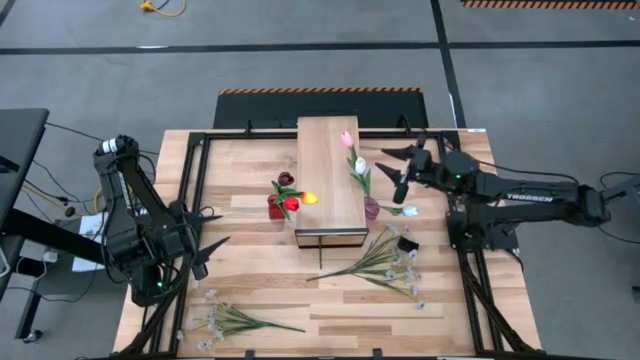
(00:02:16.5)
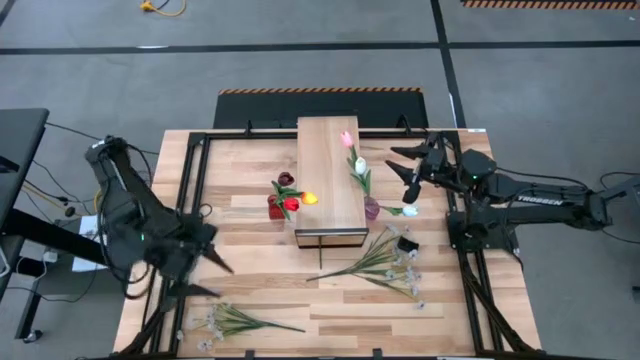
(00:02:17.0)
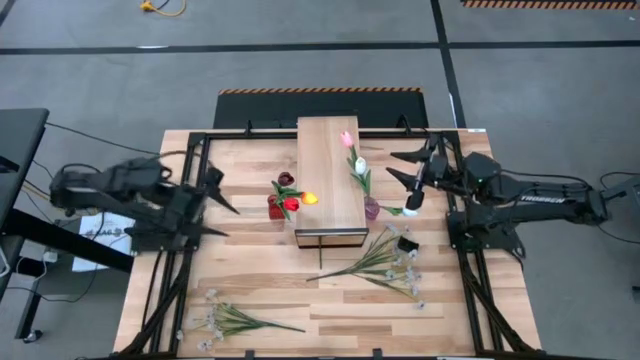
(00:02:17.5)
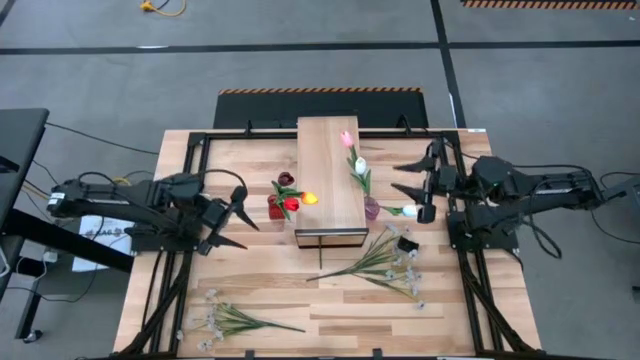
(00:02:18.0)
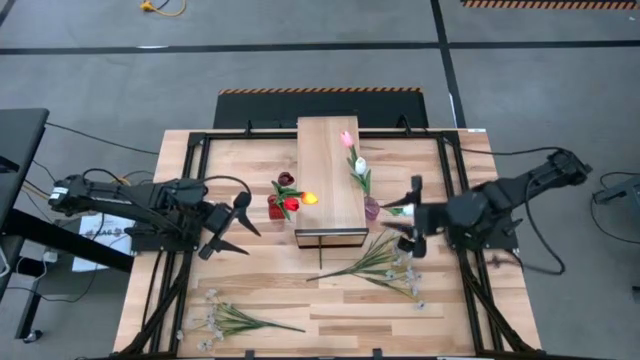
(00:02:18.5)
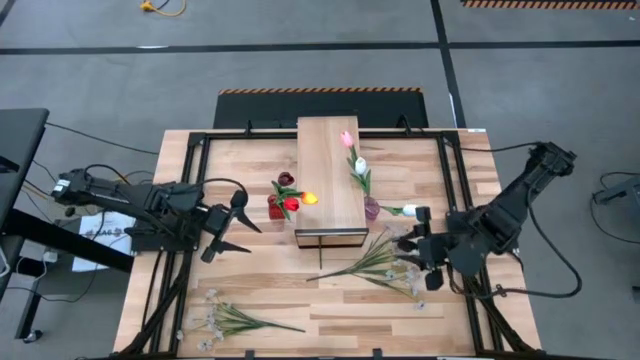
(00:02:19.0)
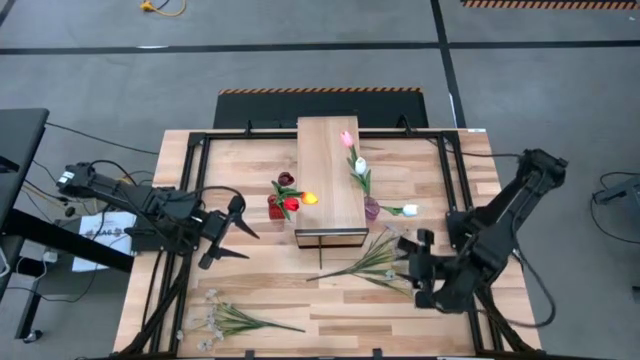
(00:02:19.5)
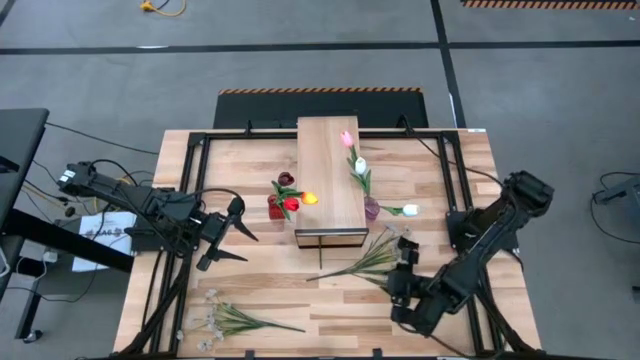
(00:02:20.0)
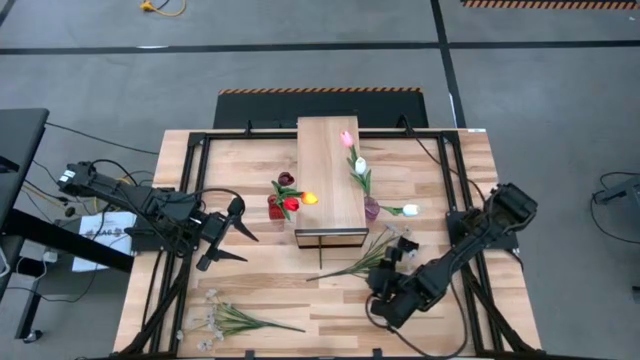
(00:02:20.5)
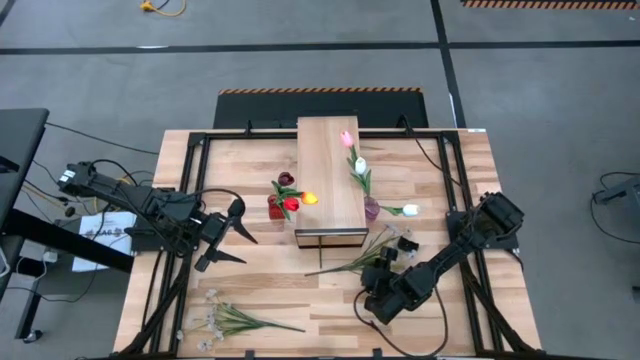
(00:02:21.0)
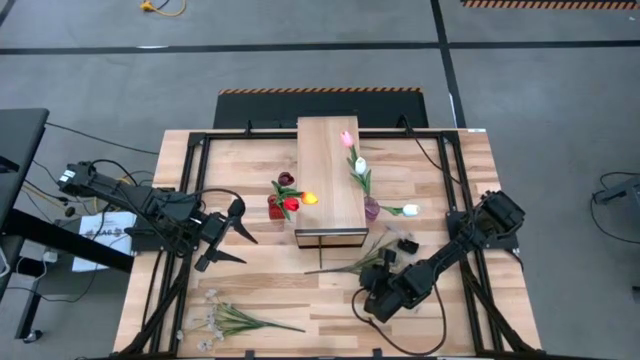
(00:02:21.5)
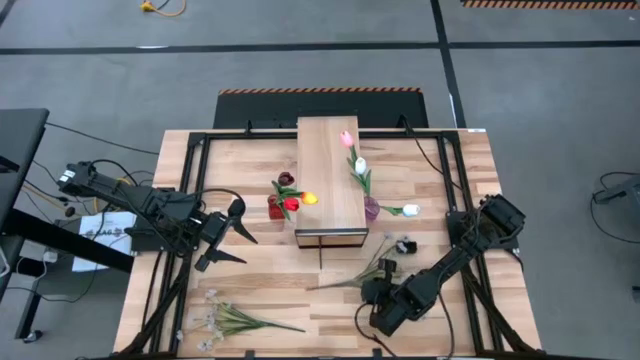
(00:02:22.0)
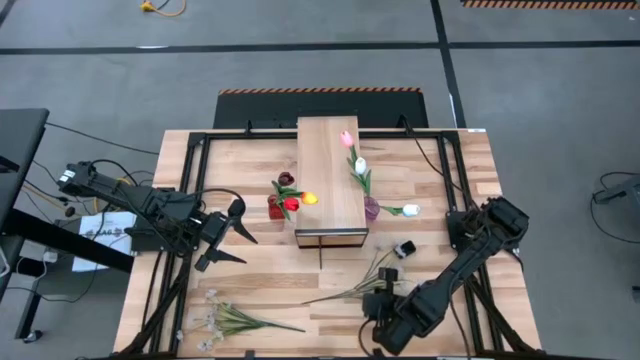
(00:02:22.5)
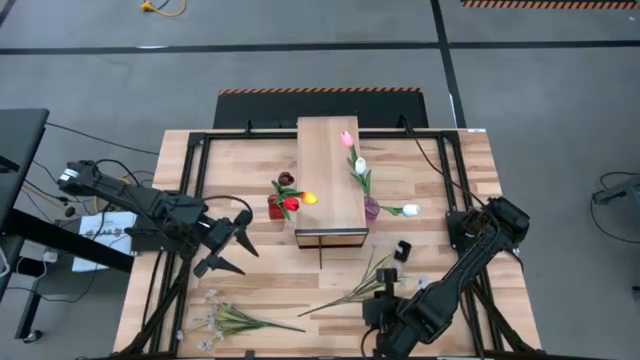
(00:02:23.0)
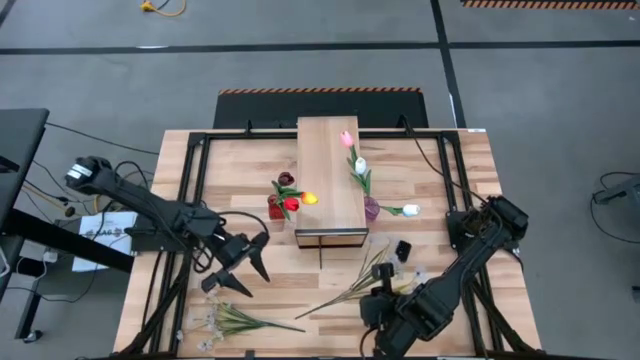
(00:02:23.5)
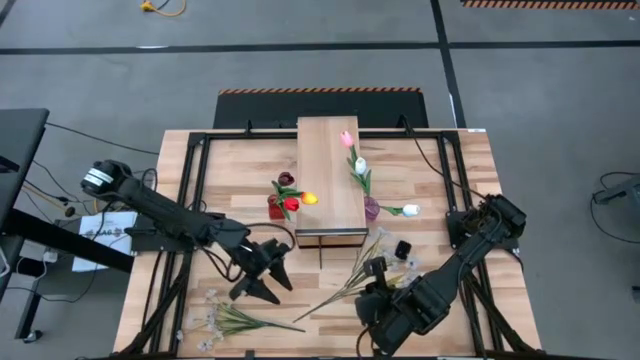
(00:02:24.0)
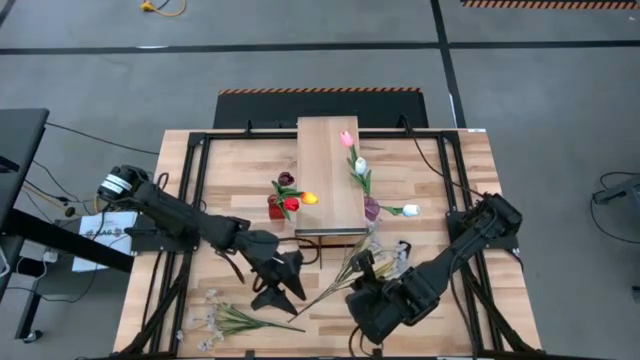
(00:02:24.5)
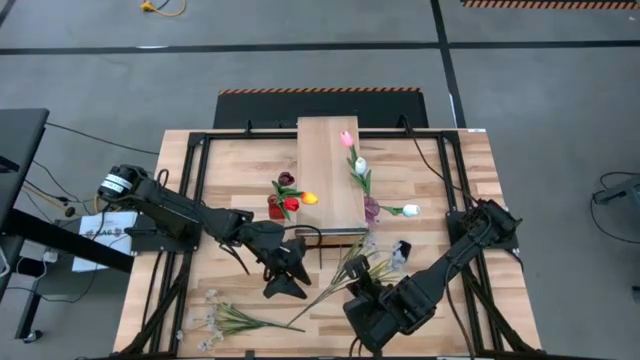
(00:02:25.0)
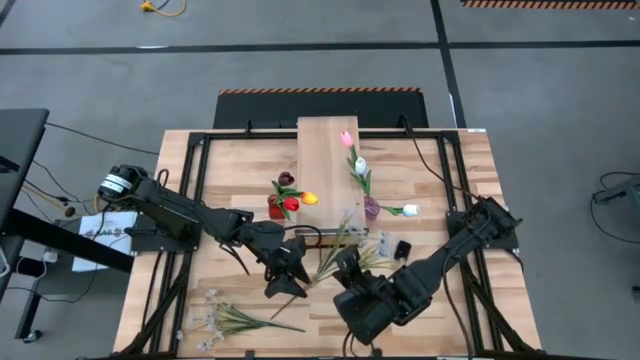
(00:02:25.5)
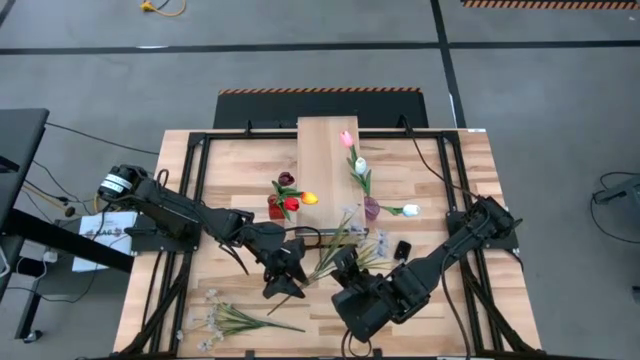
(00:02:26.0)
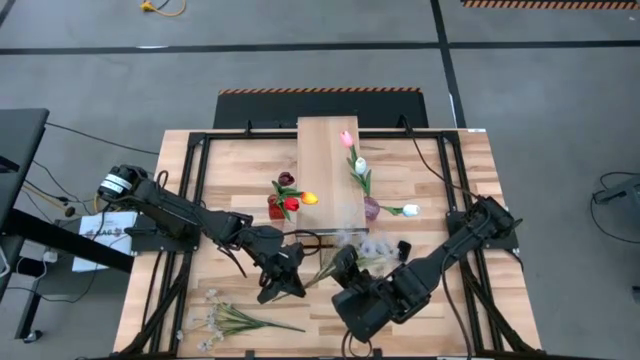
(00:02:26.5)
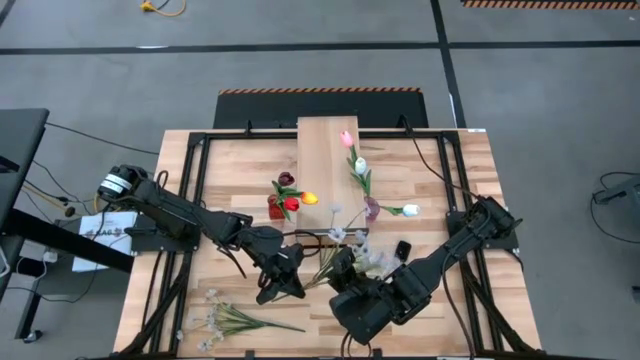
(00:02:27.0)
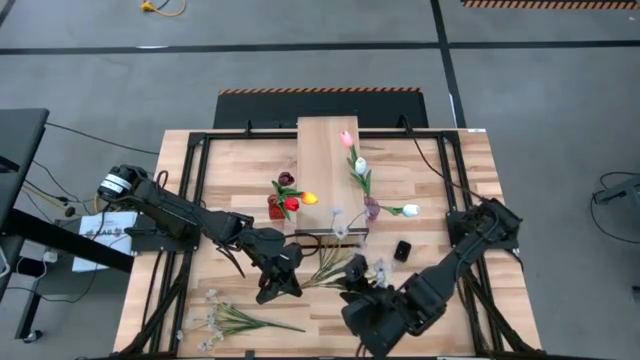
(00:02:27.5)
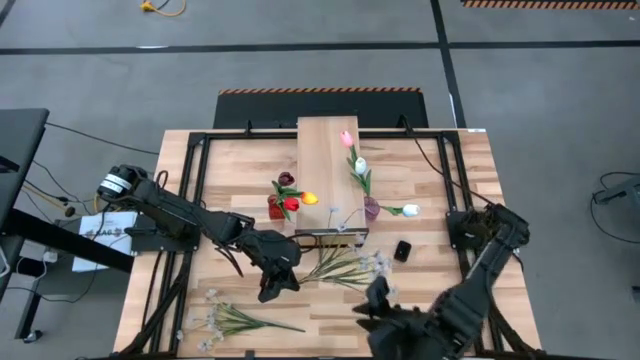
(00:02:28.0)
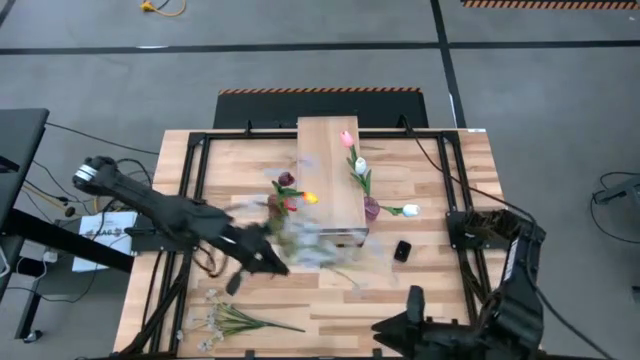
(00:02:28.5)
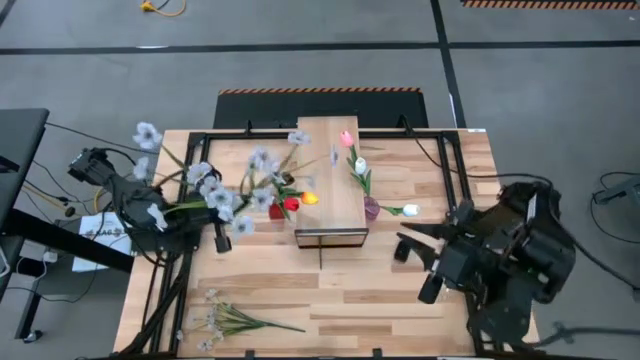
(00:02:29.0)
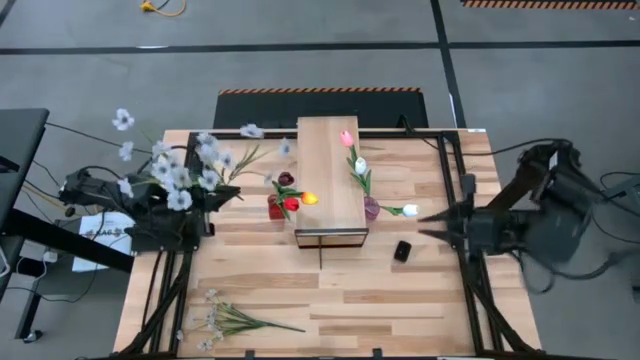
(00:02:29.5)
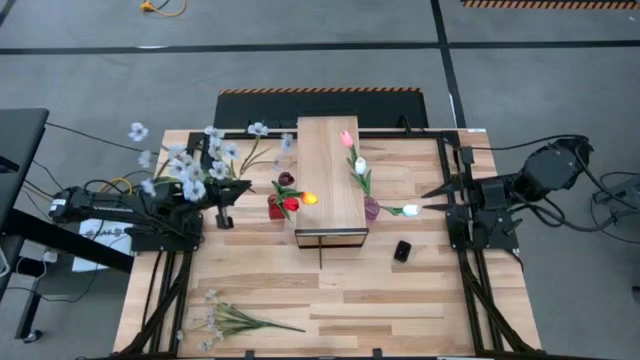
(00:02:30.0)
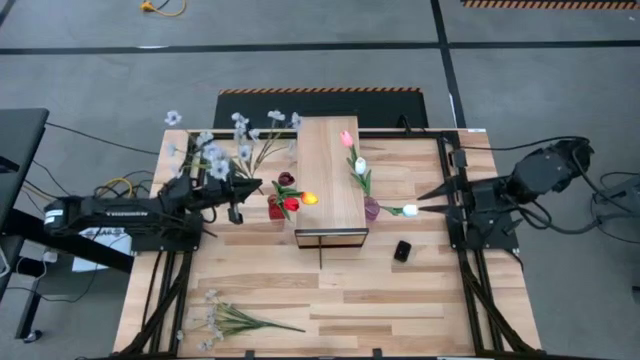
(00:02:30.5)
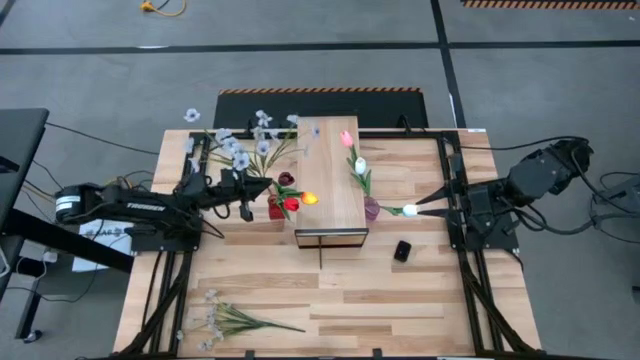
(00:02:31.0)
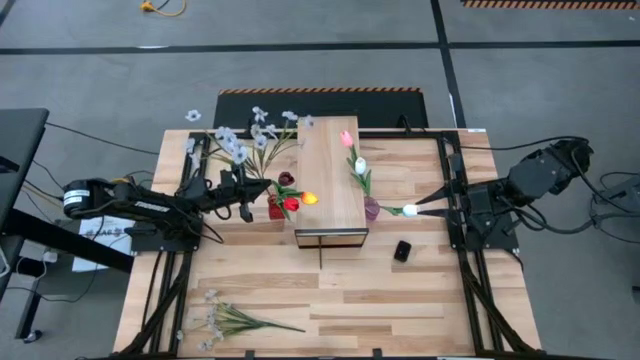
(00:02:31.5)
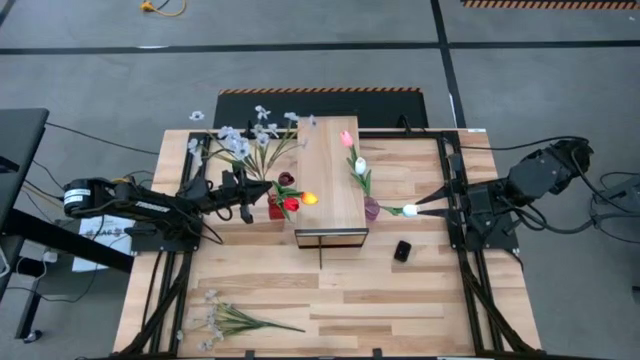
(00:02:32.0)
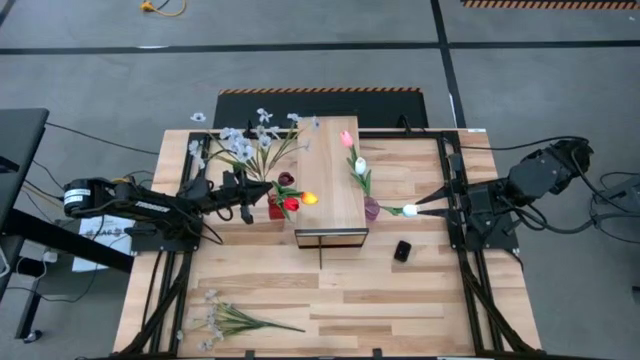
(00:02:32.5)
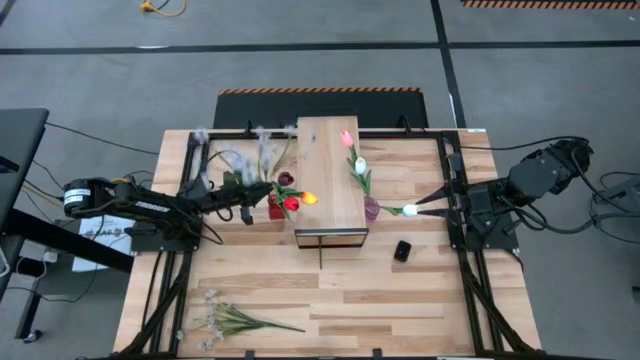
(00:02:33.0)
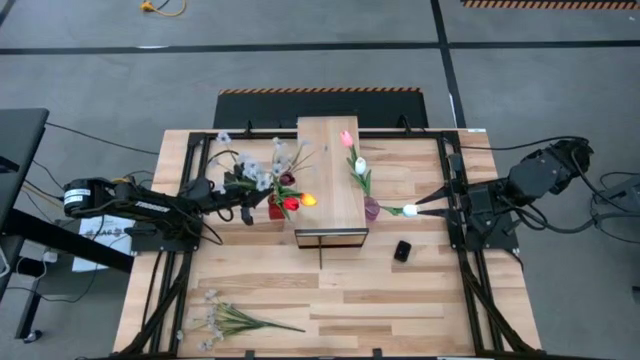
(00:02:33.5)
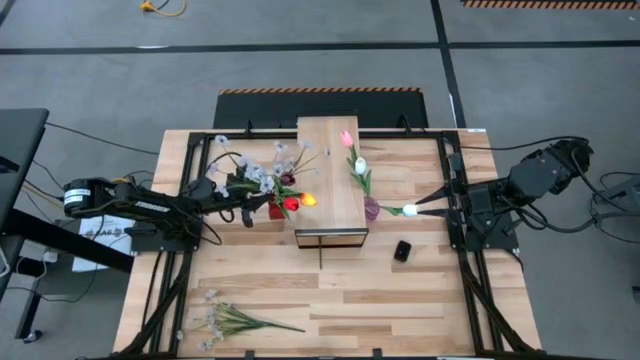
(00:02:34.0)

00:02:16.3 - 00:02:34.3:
Task: Pick and place flowers into a vace then onto a shelf
Put the right white flowers into the red flower vase

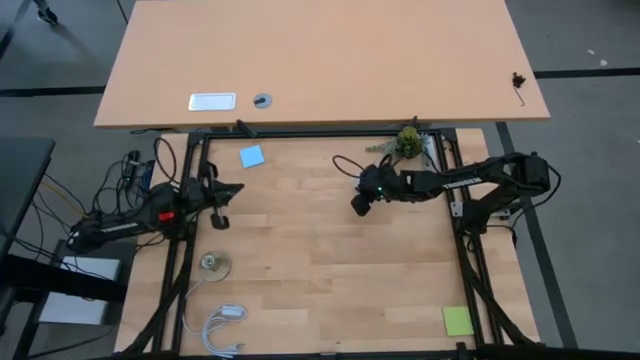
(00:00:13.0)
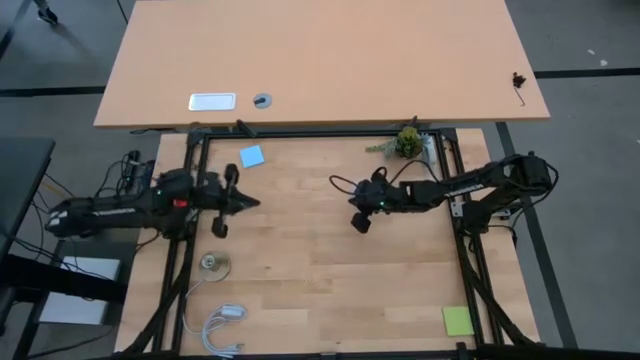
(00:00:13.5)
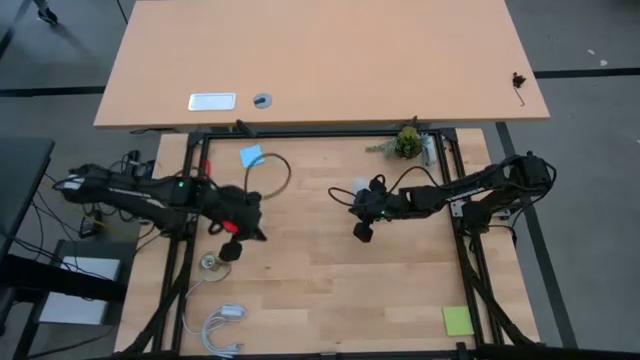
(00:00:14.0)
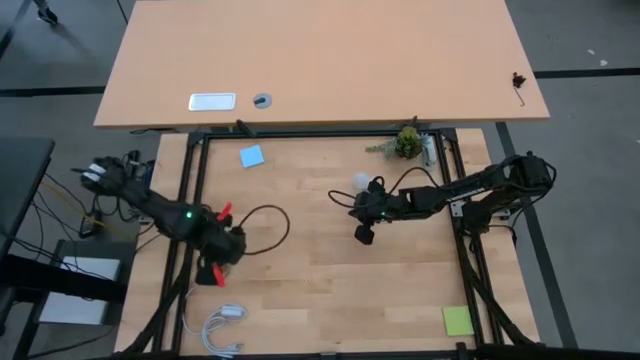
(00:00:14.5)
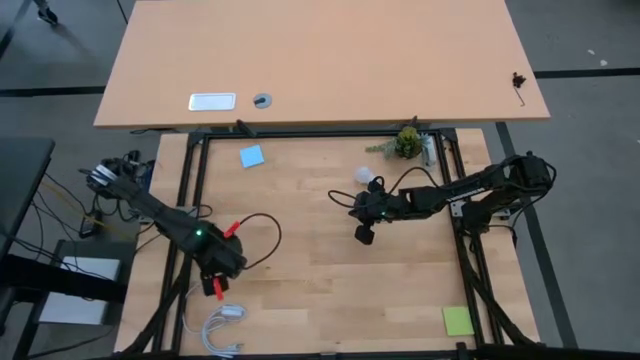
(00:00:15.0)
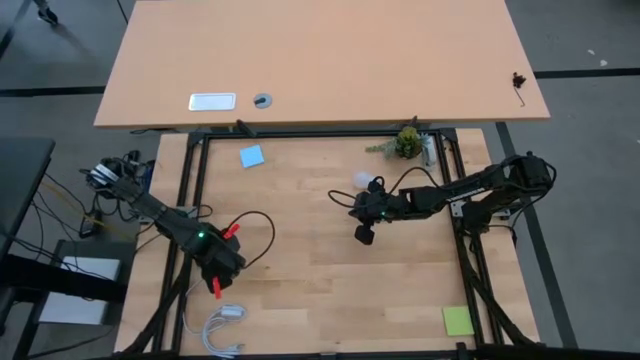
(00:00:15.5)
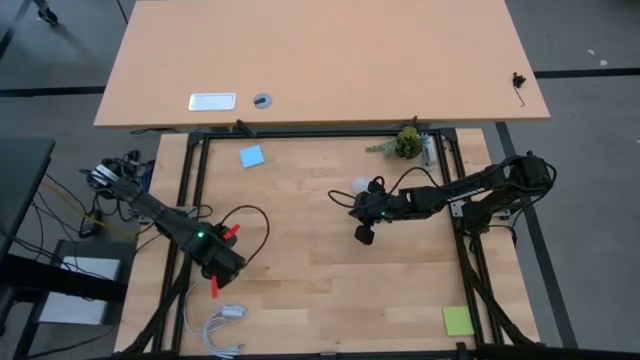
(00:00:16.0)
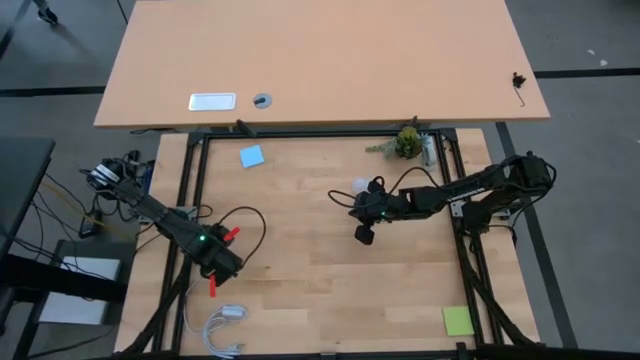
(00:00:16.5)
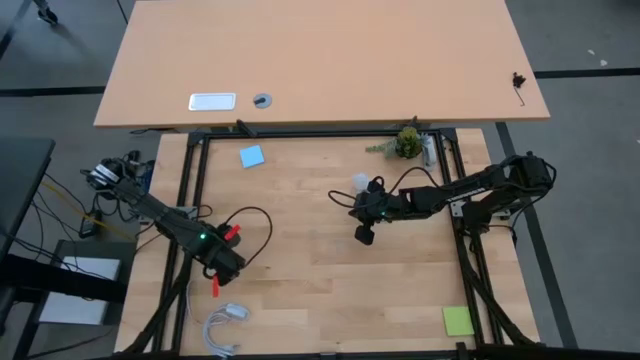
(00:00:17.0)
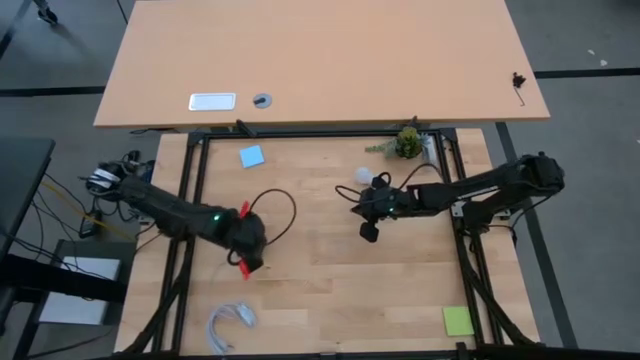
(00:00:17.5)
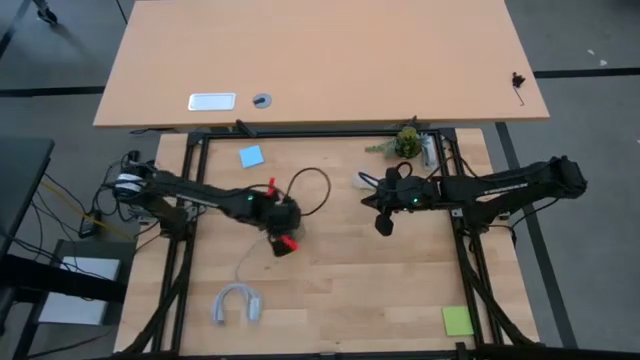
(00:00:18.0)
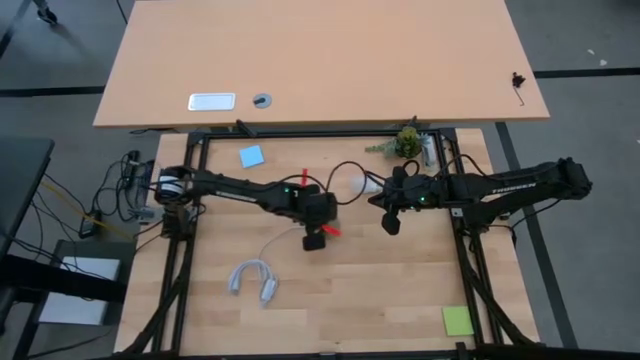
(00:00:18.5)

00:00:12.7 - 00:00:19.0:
Task: Screw lightbulb
Move the lamp to the center of the table
